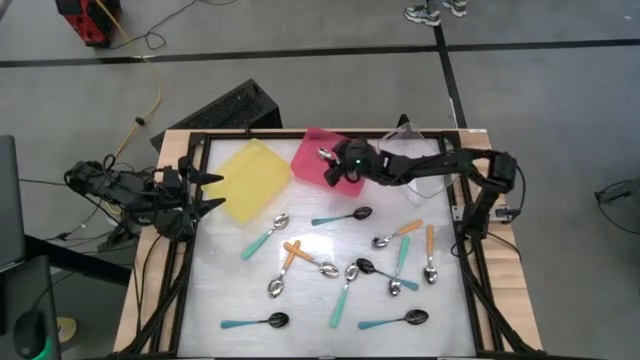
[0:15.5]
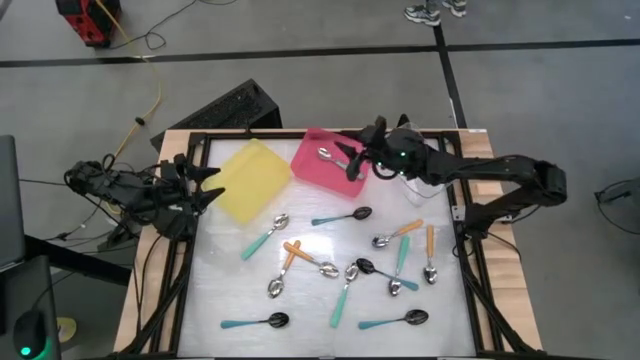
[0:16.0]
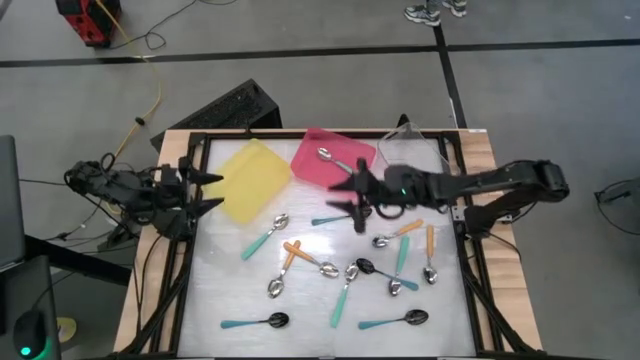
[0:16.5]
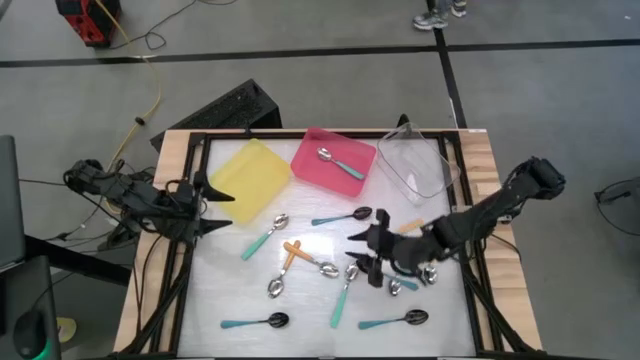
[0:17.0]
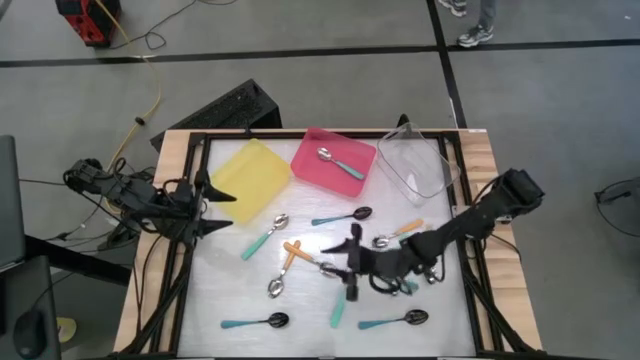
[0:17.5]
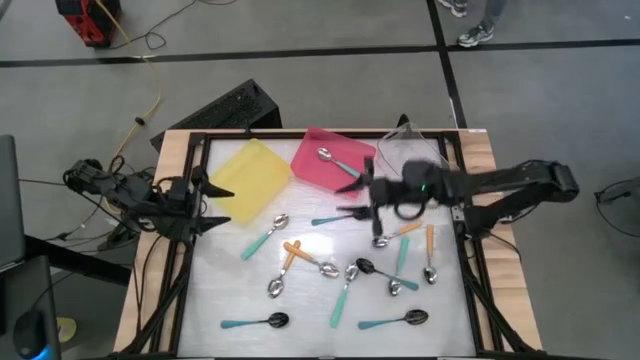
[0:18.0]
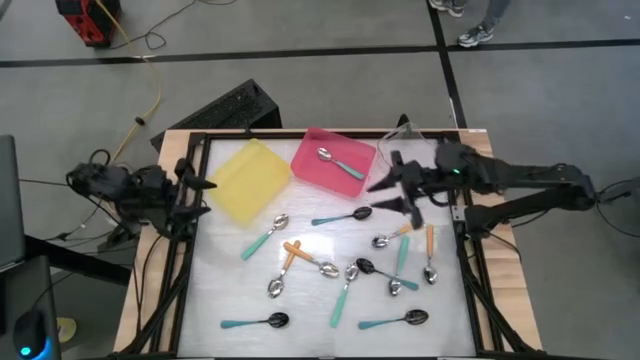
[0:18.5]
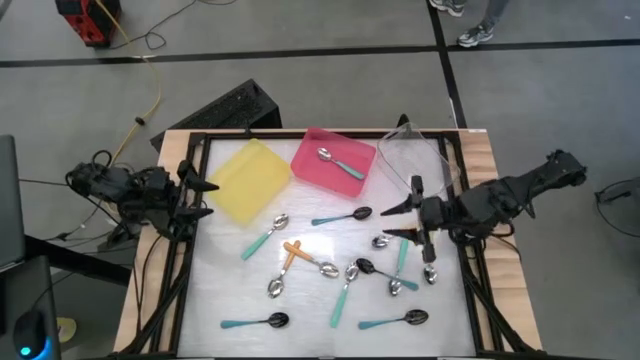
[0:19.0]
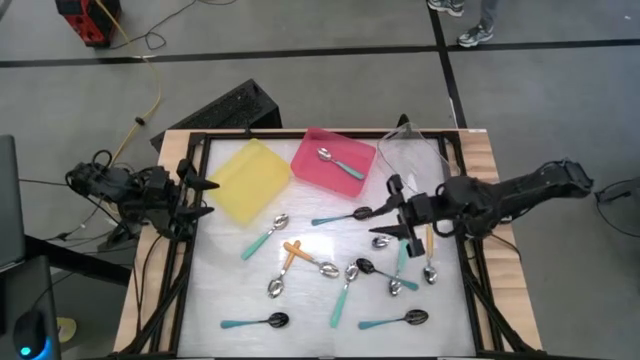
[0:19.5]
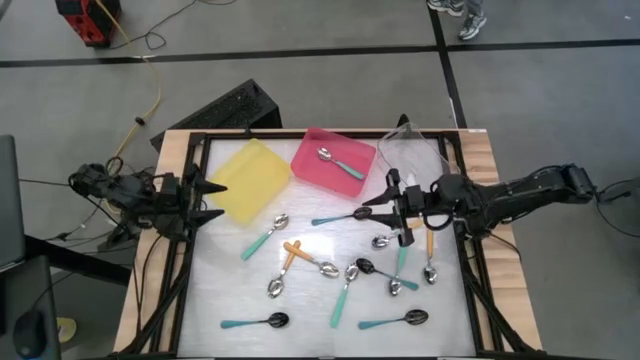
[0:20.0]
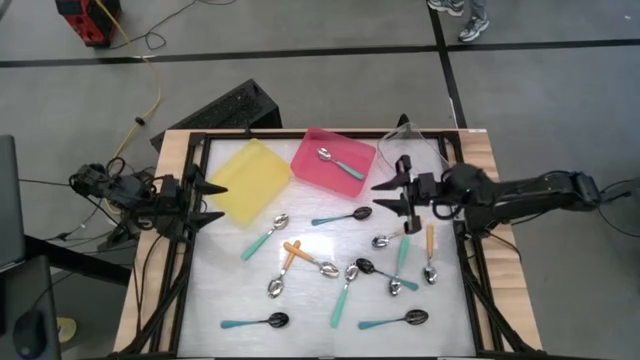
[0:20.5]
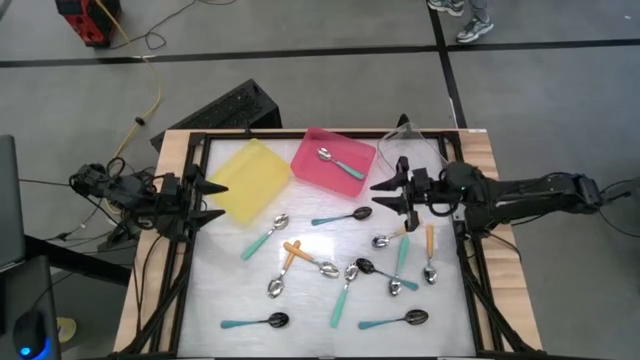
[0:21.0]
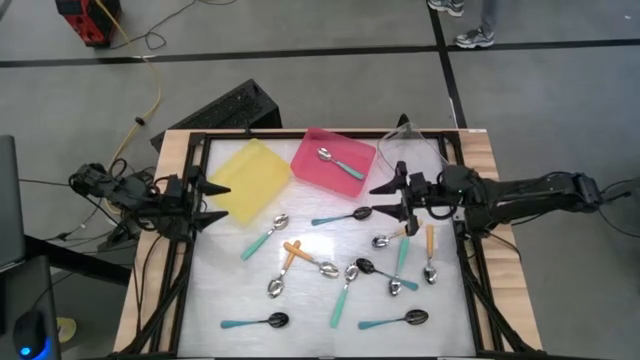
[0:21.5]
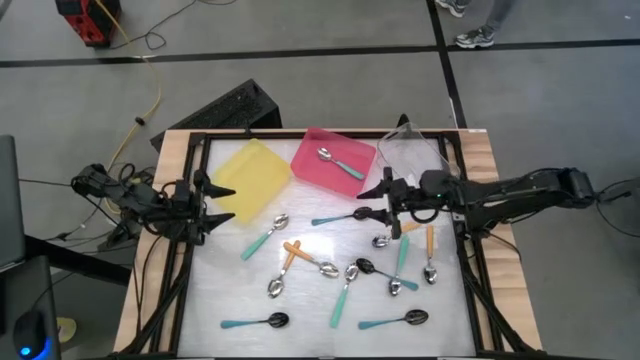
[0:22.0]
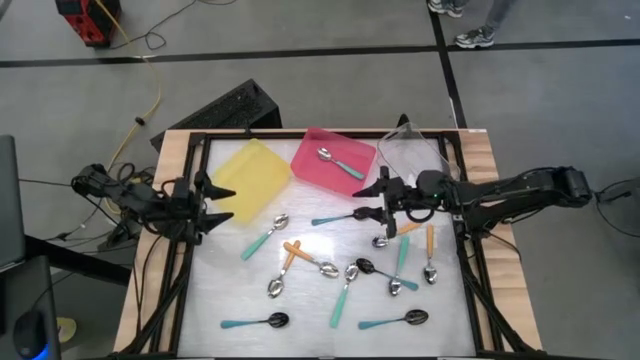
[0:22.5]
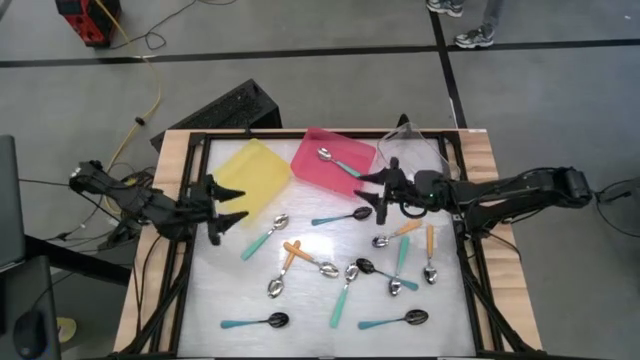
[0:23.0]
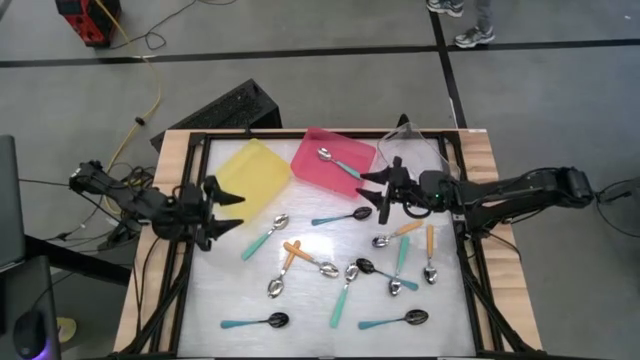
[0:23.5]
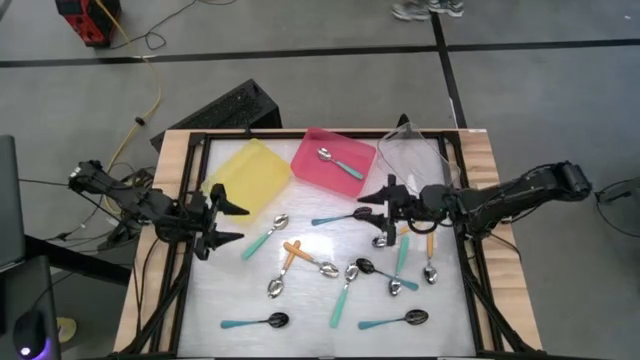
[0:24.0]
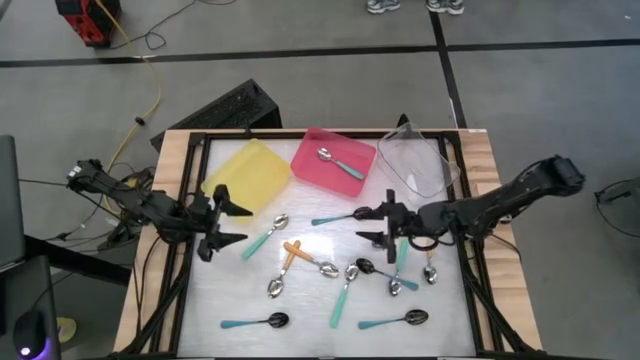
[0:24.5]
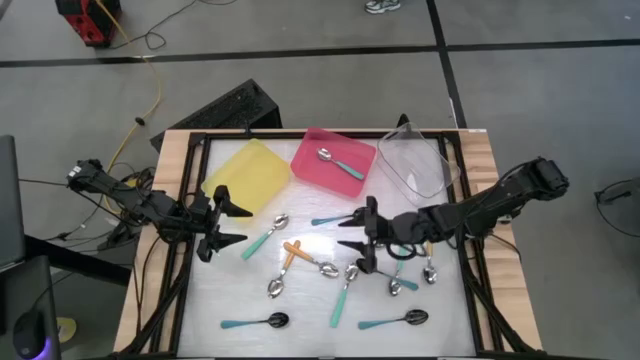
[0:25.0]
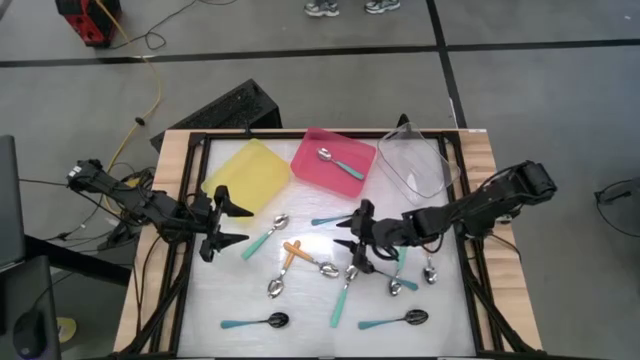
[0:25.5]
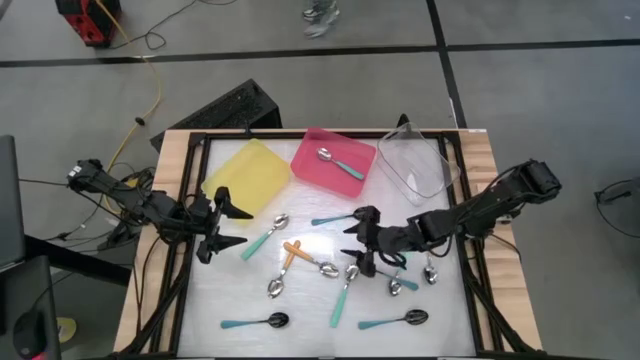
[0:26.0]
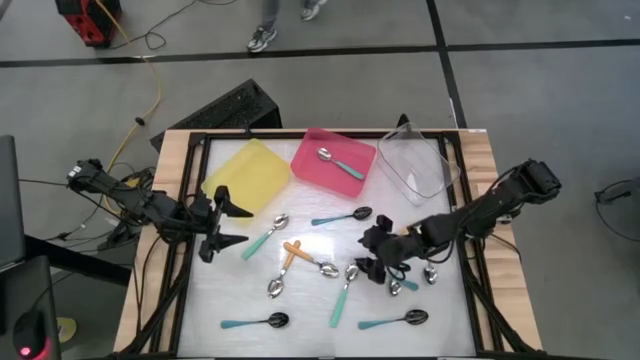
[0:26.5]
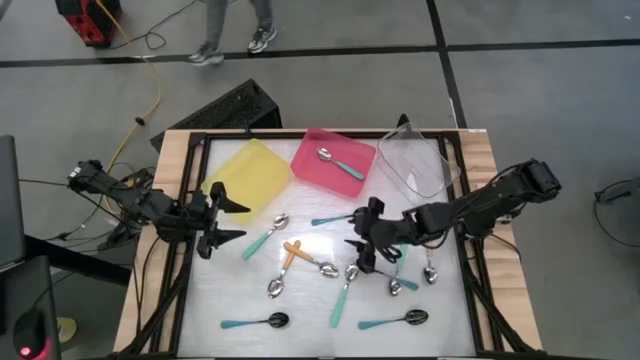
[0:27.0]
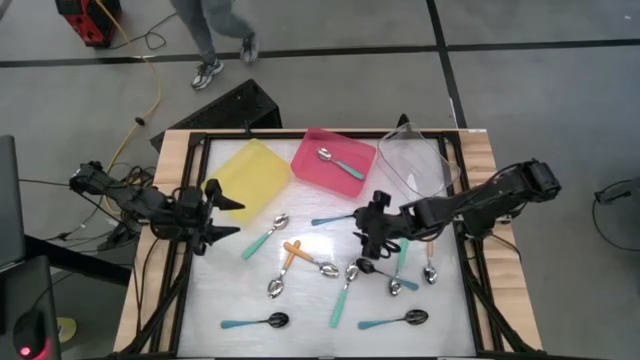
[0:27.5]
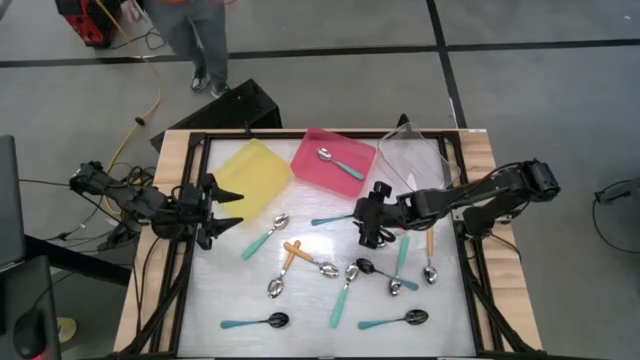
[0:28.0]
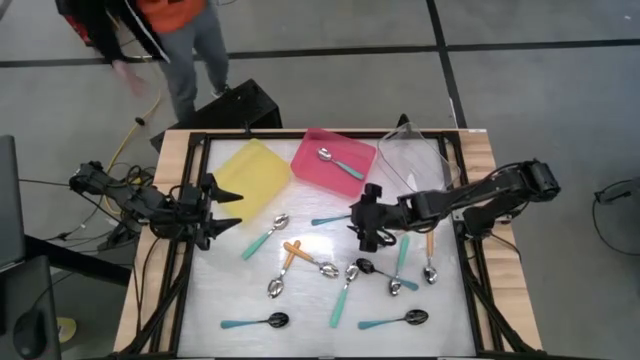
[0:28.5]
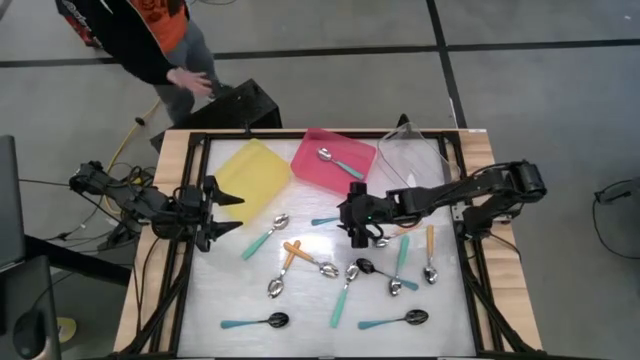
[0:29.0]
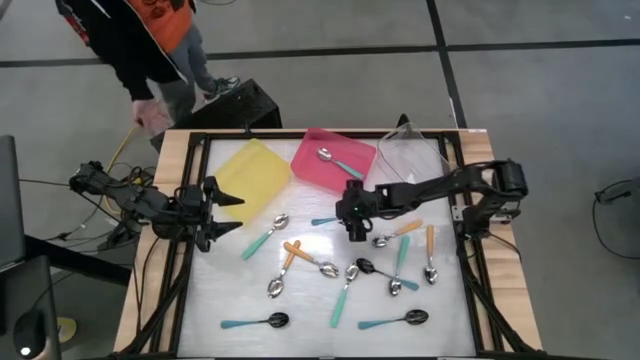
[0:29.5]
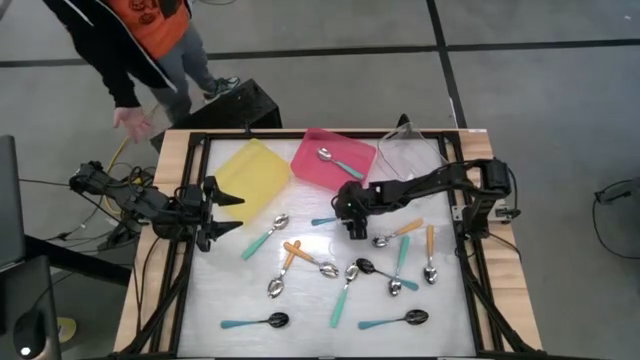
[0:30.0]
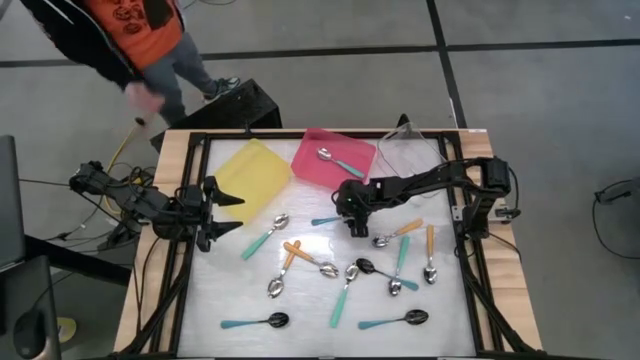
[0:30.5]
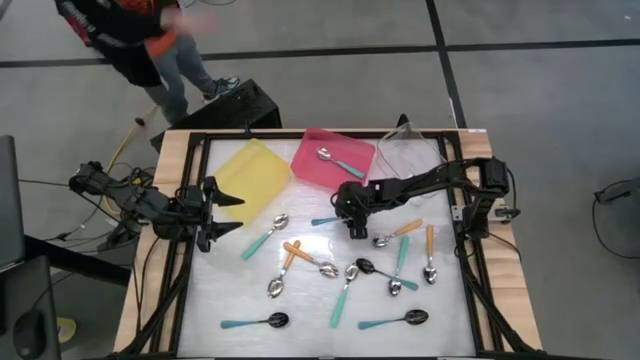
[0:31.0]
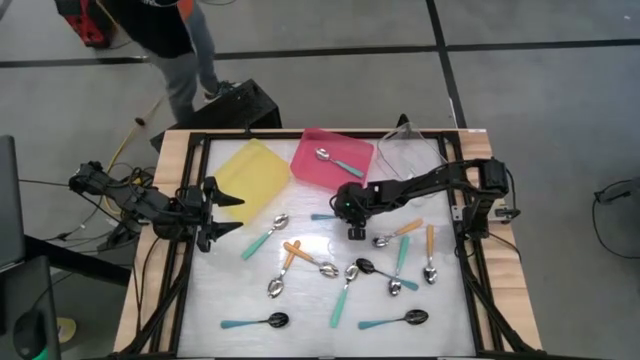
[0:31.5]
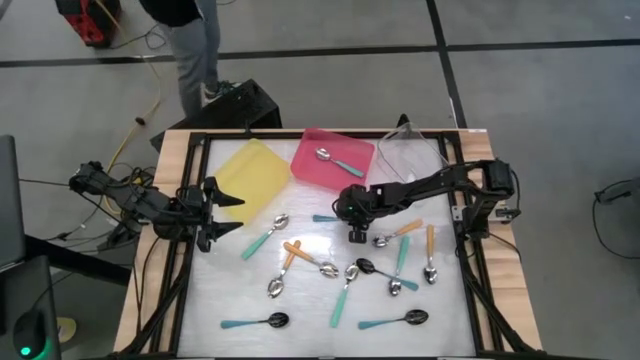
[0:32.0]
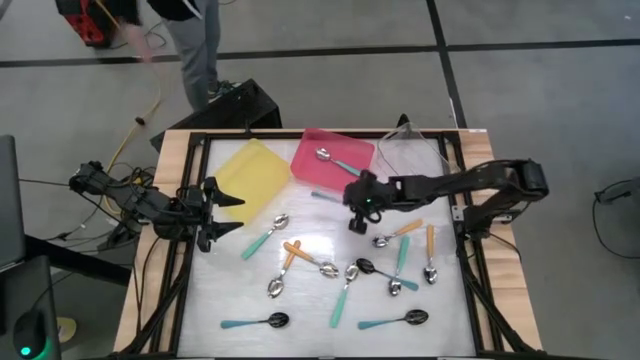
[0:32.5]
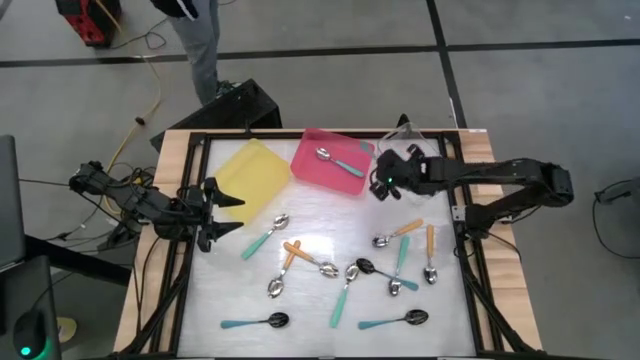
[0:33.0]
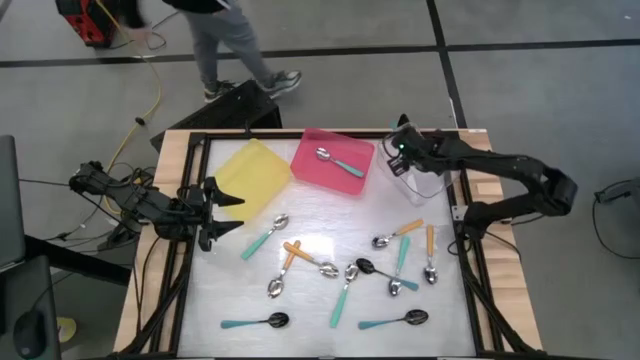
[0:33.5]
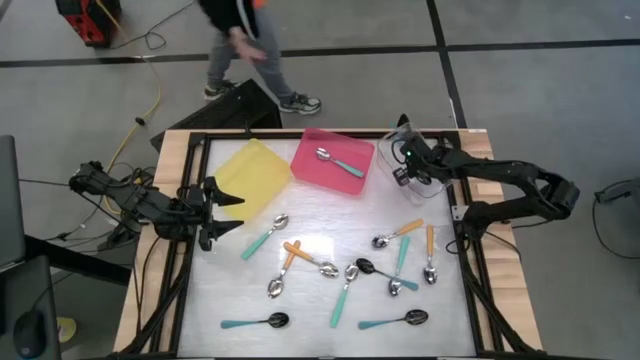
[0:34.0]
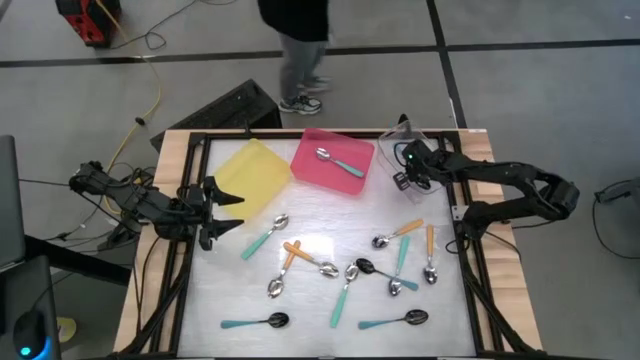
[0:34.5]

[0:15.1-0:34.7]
Task: Sort silverware by color (type)
Put the blue spoon into the transparent bin
